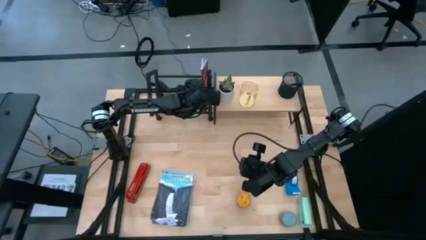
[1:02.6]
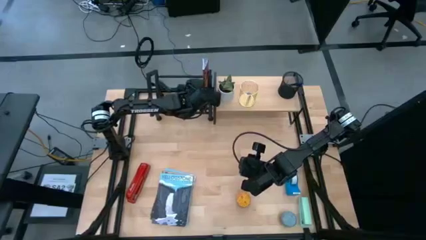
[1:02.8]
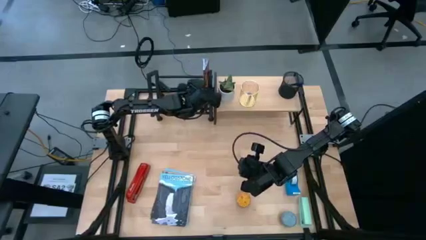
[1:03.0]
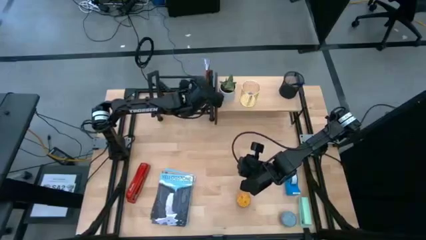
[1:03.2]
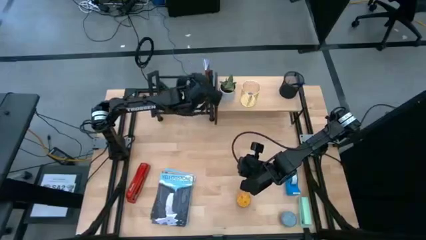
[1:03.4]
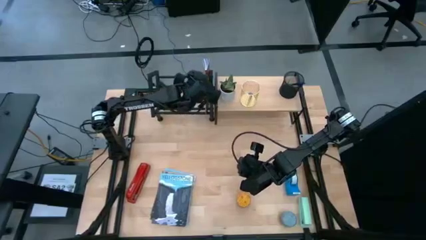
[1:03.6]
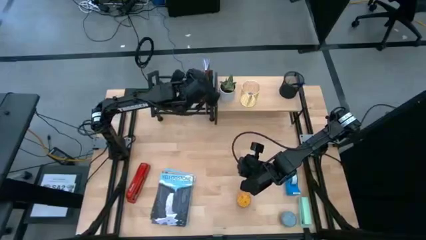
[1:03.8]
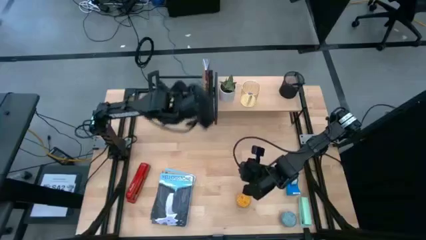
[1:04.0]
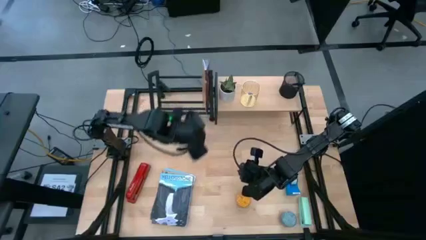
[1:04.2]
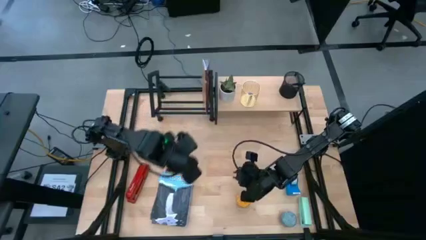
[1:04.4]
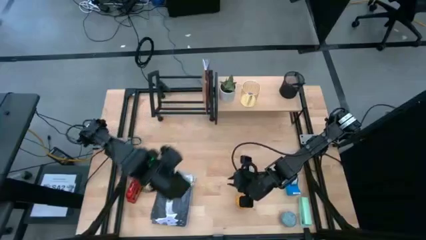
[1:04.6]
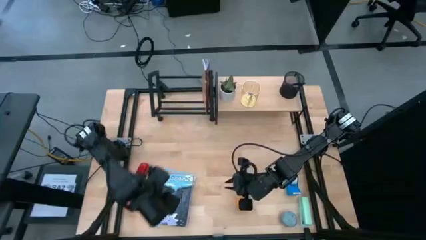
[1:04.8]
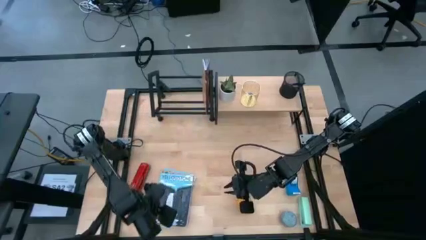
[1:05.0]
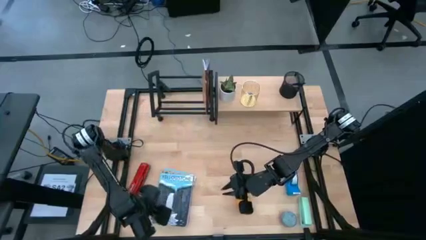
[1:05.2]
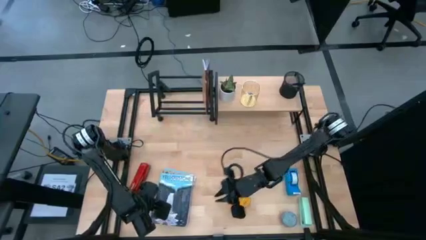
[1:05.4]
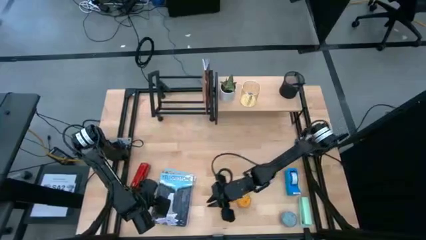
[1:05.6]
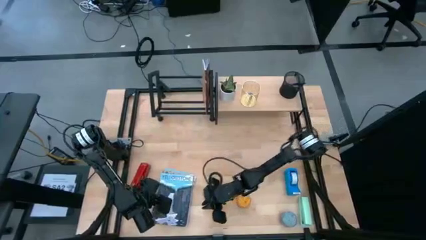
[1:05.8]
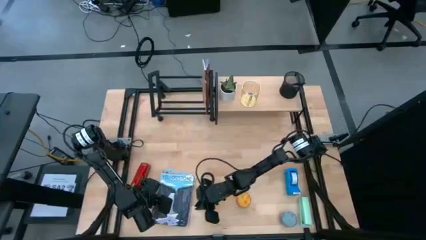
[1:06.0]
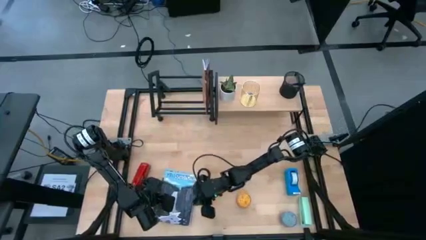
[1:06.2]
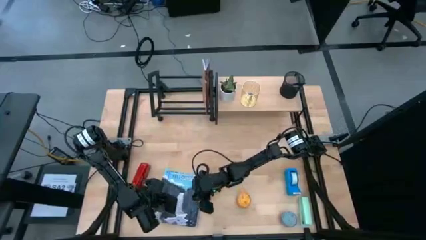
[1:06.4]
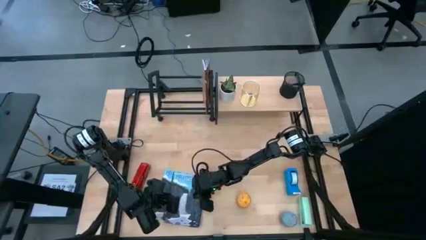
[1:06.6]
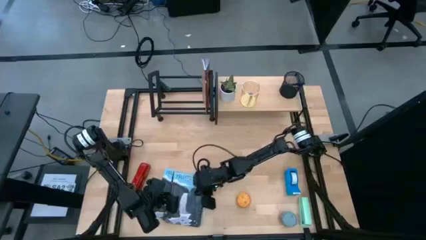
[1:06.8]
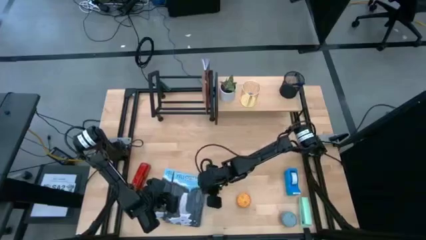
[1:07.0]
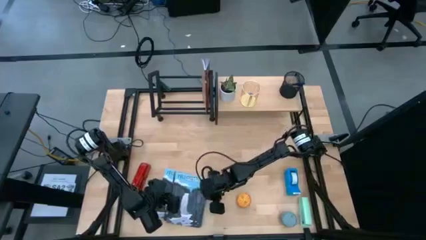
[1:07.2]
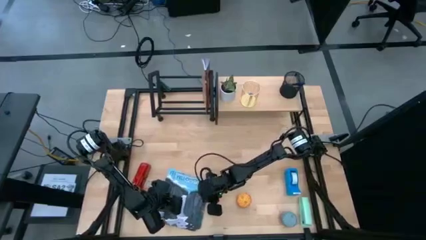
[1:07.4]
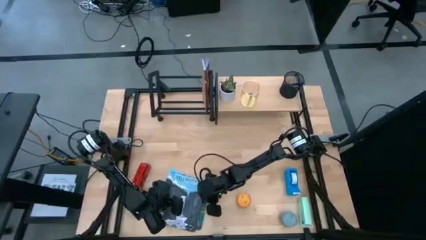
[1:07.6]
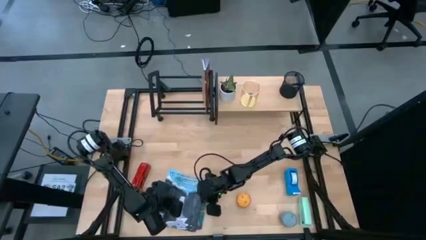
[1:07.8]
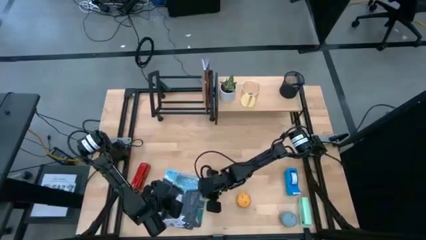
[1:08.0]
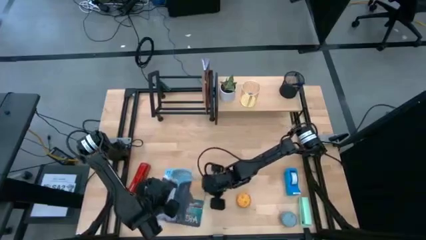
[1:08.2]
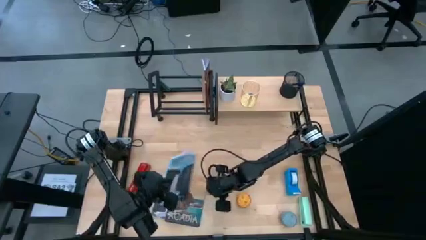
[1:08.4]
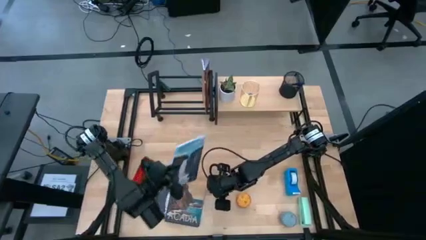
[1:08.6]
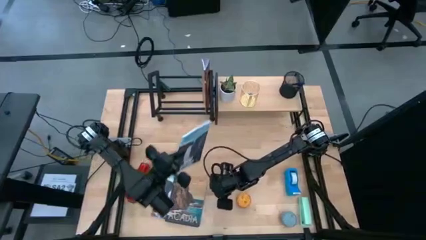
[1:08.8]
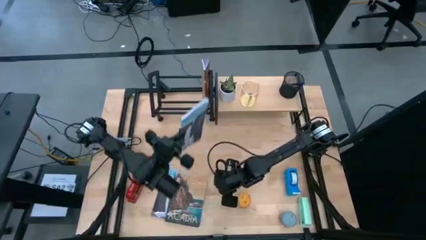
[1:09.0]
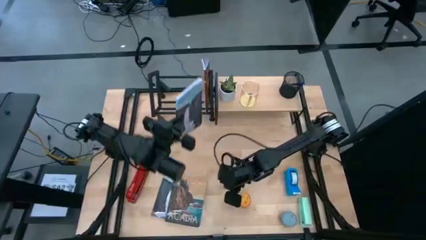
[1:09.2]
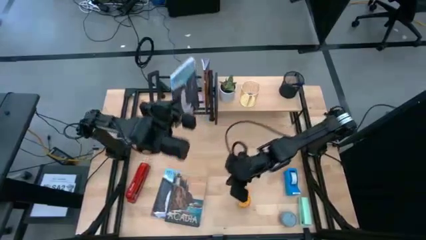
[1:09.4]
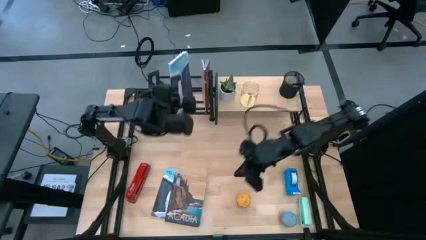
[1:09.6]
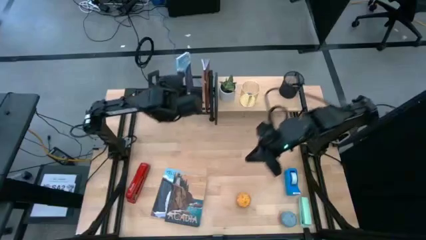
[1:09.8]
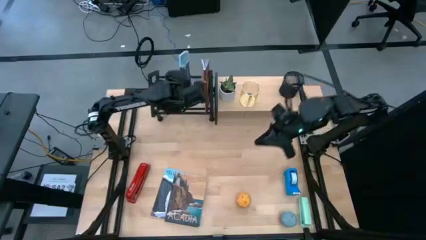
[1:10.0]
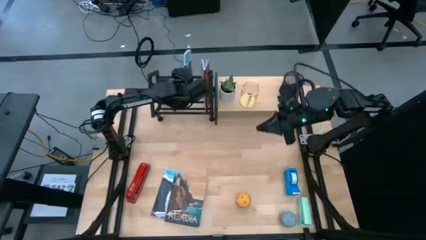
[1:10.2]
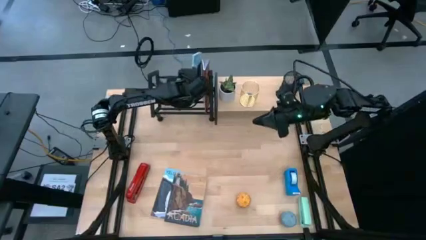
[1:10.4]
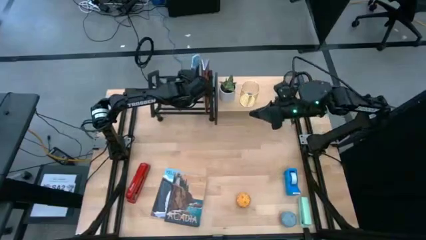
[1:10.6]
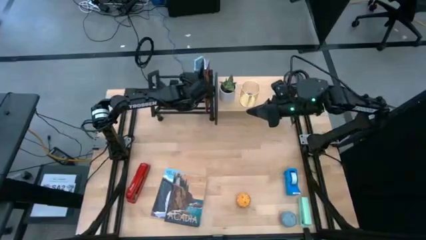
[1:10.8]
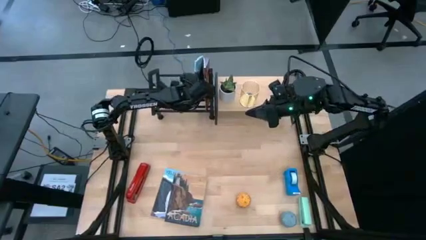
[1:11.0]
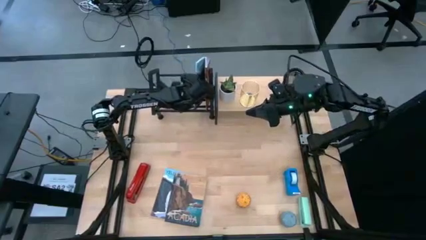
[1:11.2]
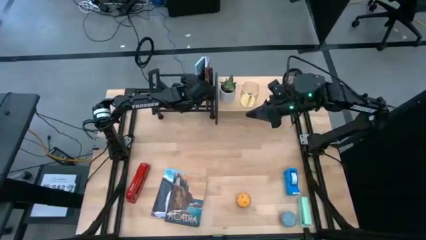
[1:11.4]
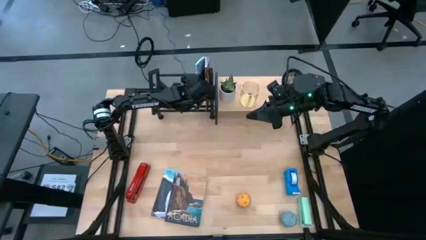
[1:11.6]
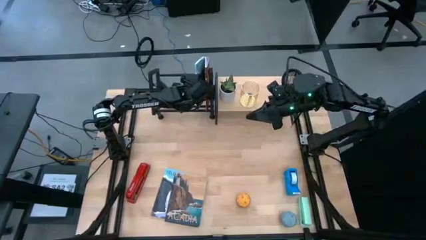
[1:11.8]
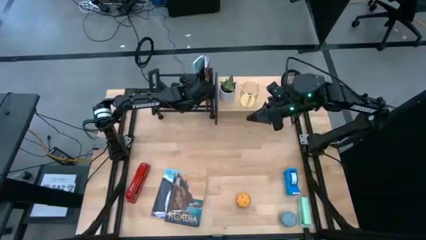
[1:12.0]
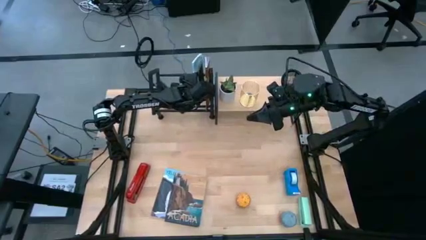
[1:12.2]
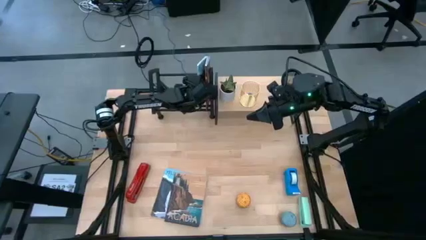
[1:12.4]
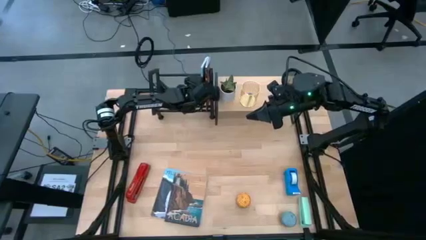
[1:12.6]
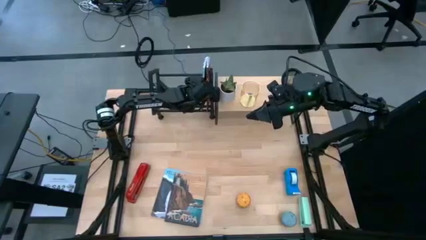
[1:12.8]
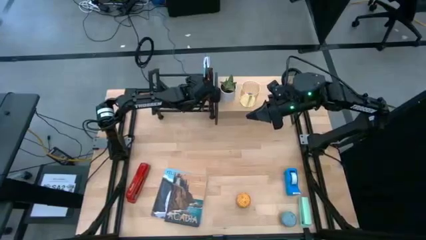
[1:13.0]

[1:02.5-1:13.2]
Task: Stock shelves
Put the blue book on the black book shelf

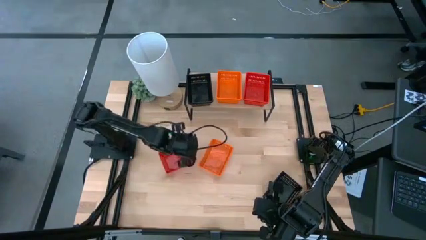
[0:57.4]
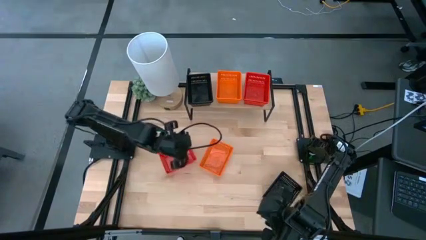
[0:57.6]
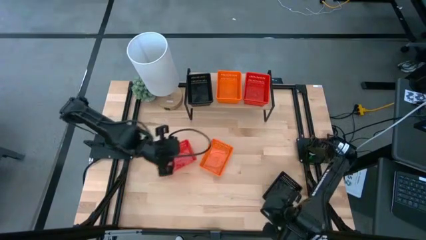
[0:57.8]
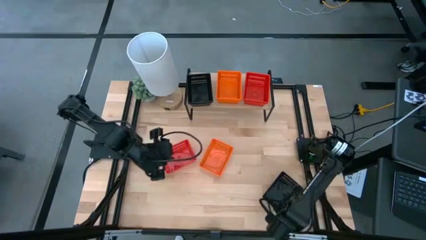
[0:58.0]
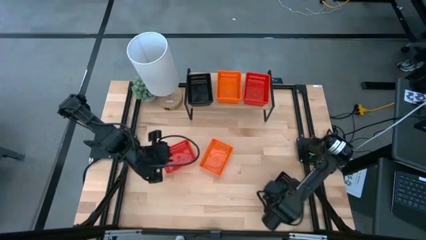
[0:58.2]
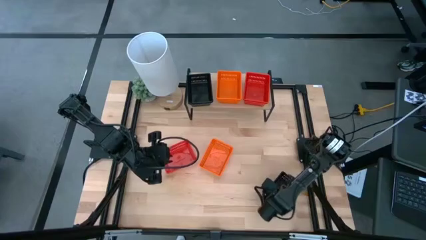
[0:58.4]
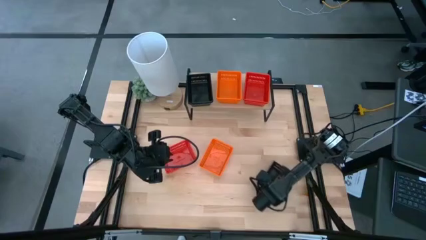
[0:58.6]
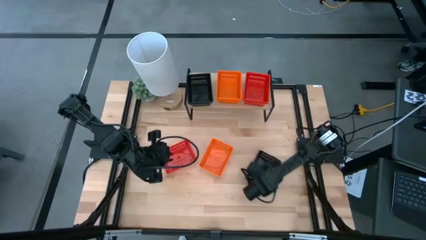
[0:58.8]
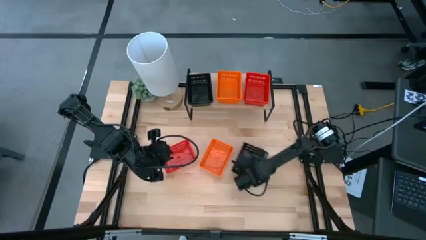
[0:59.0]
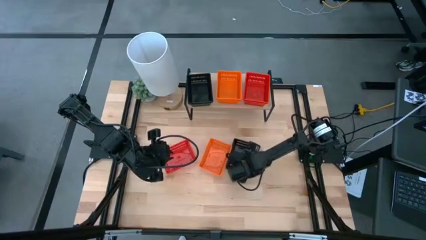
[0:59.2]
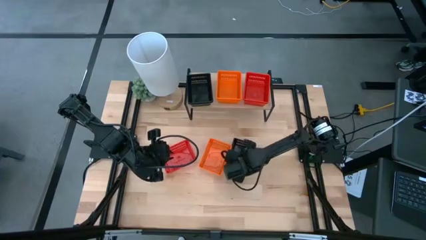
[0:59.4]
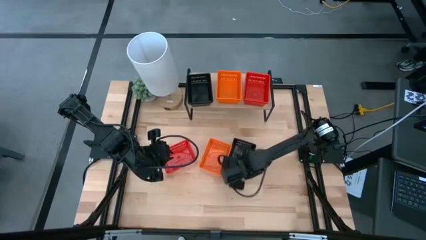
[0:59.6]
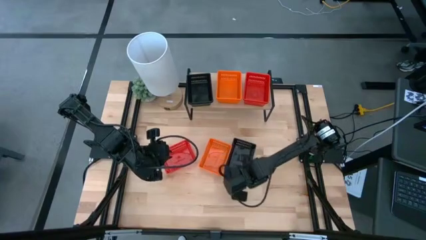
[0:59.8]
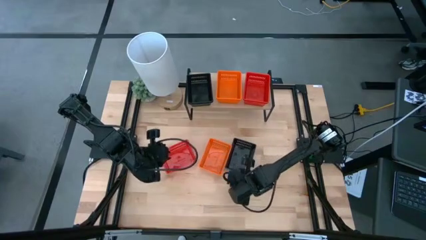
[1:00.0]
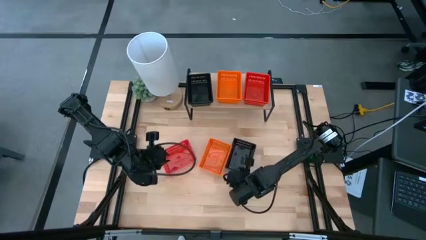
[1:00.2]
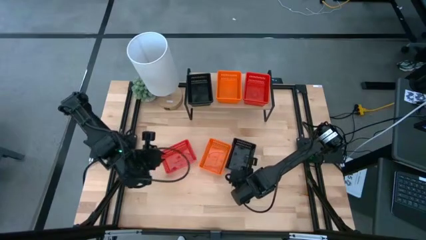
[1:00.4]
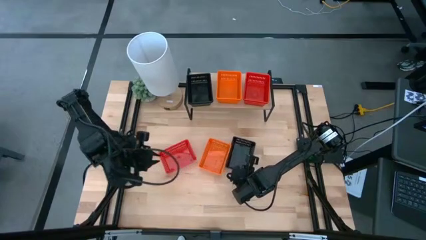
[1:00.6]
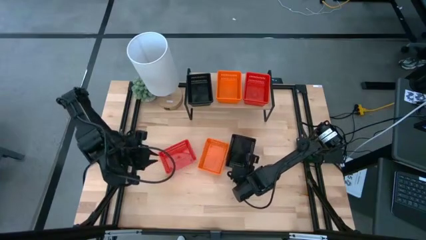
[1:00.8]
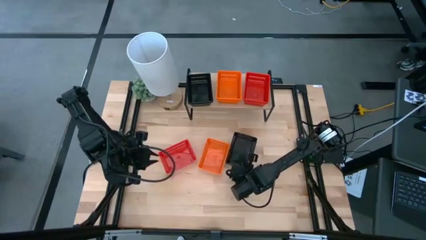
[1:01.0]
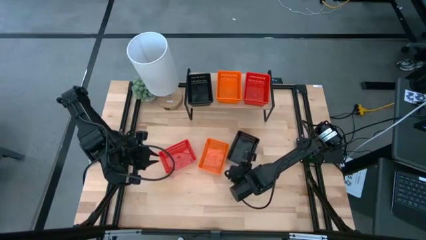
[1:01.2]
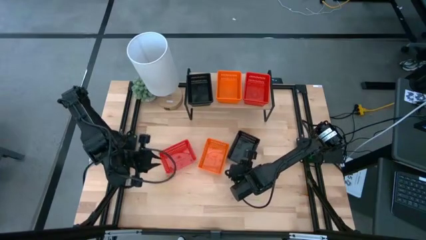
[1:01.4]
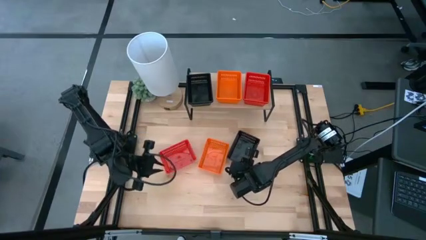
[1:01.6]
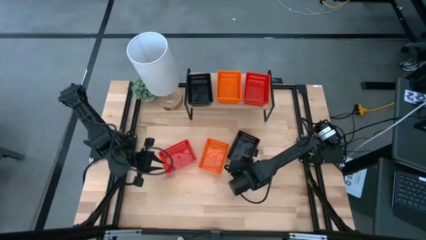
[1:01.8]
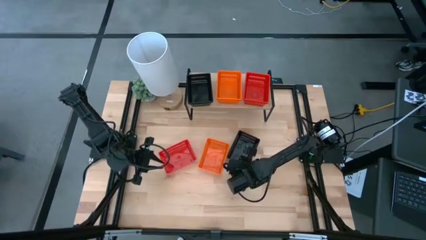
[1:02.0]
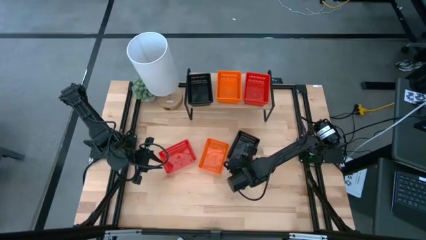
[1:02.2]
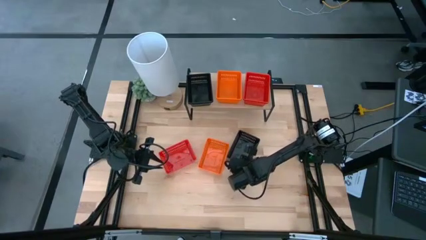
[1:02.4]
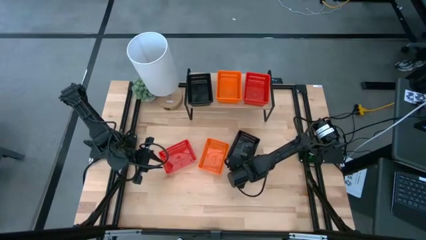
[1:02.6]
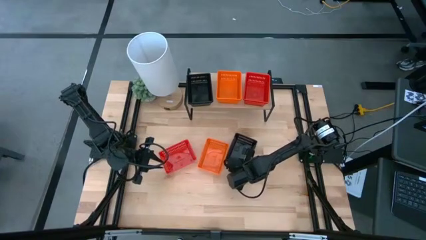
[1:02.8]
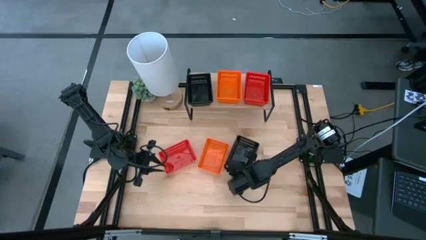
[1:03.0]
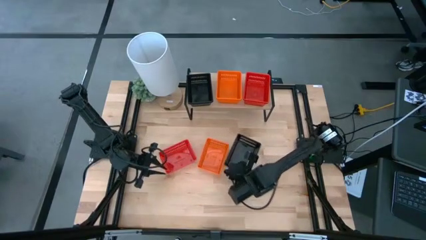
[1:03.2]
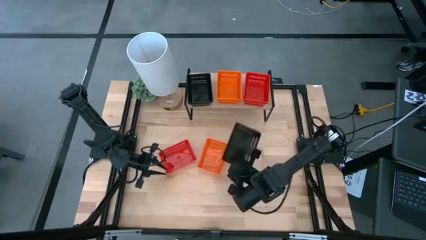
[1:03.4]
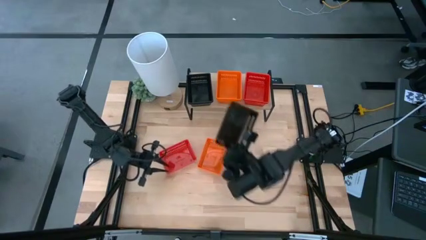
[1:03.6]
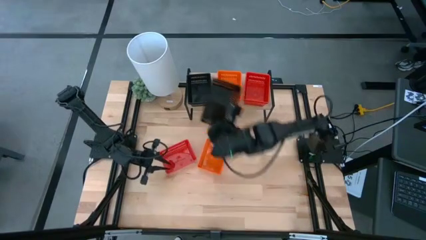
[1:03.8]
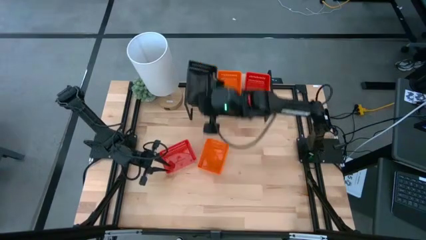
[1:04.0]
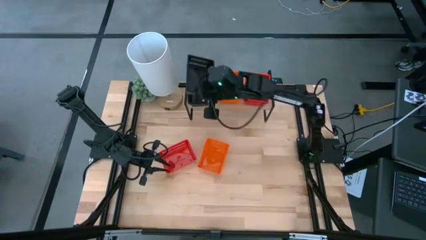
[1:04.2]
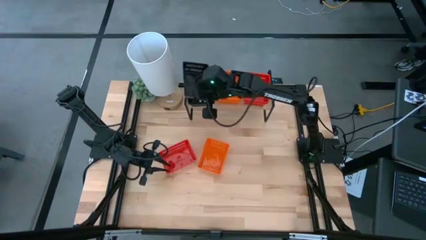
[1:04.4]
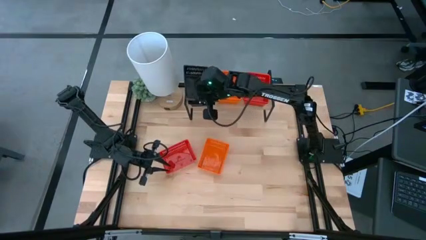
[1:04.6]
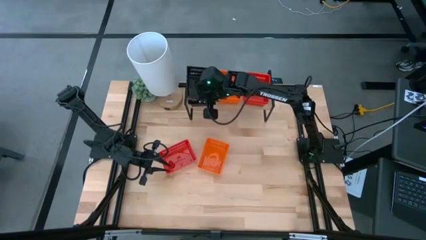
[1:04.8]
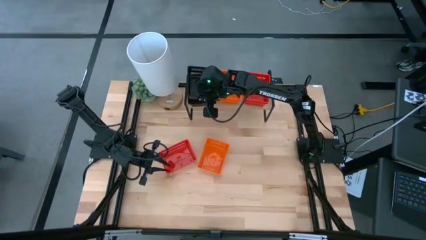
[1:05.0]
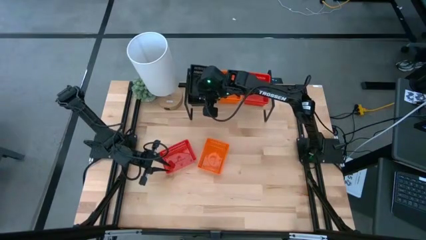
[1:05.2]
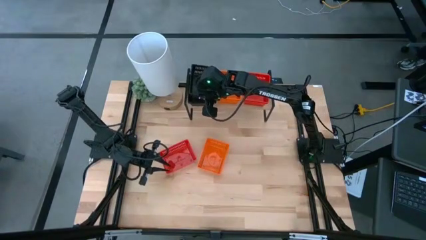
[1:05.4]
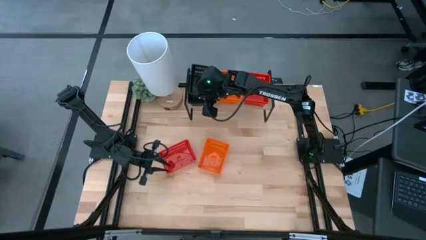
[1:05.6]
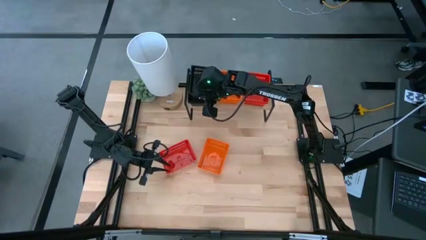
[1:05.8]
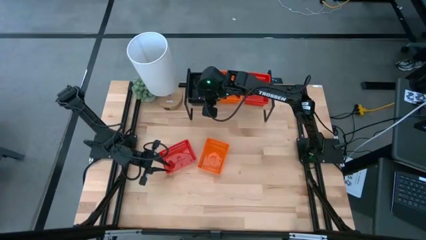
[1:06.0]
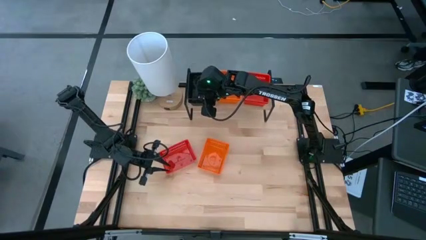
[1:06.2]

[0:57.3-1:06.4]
Task: Stack baskets on shelf by color
Stack the black bin on top of the stacked black bins on the shelf
